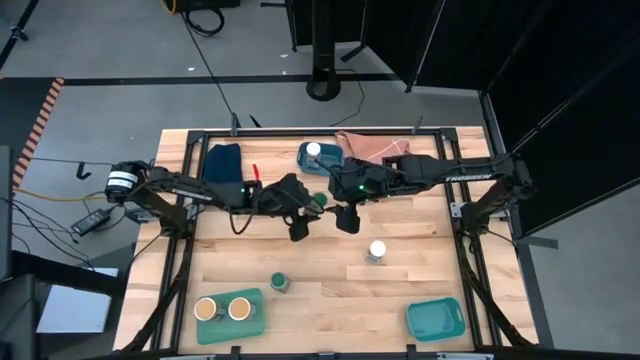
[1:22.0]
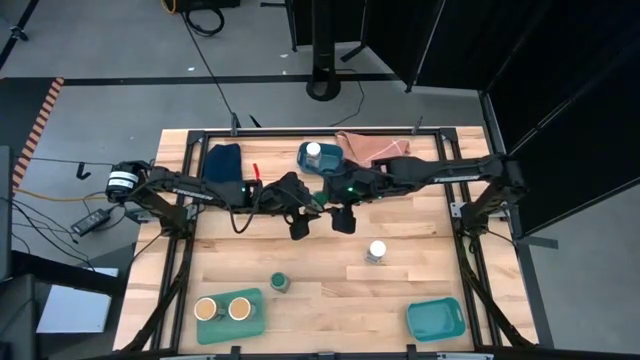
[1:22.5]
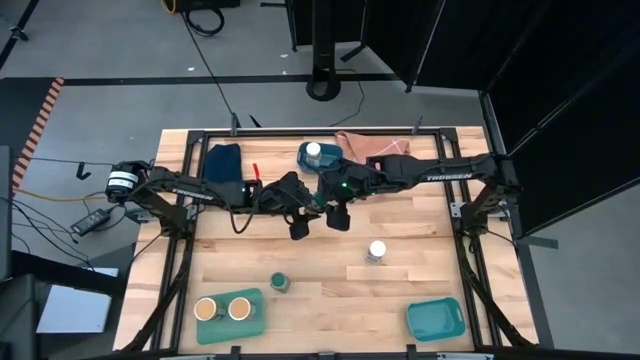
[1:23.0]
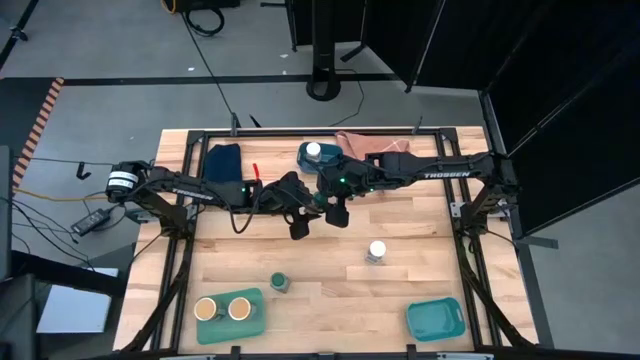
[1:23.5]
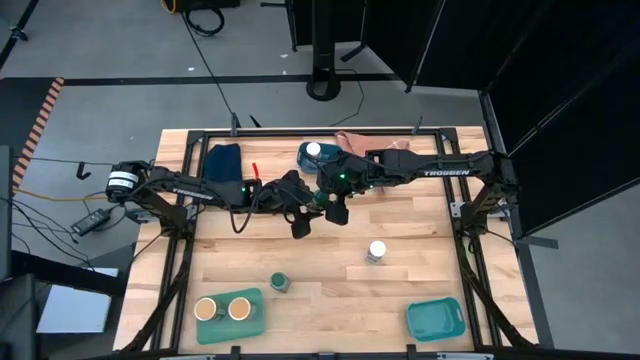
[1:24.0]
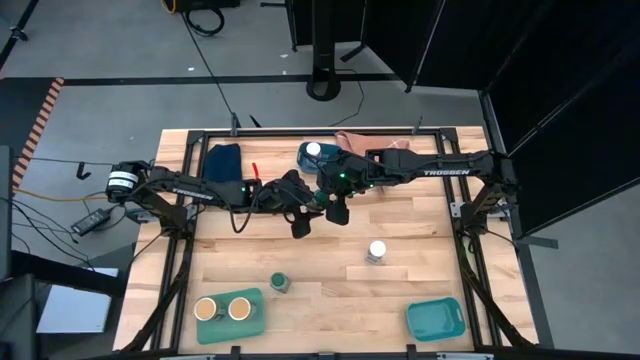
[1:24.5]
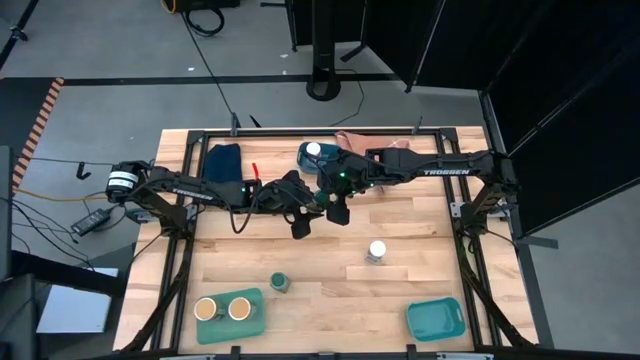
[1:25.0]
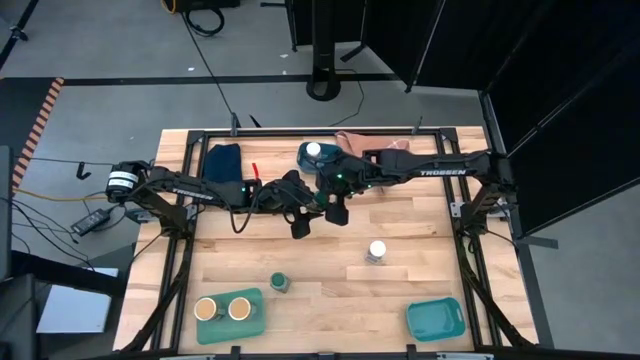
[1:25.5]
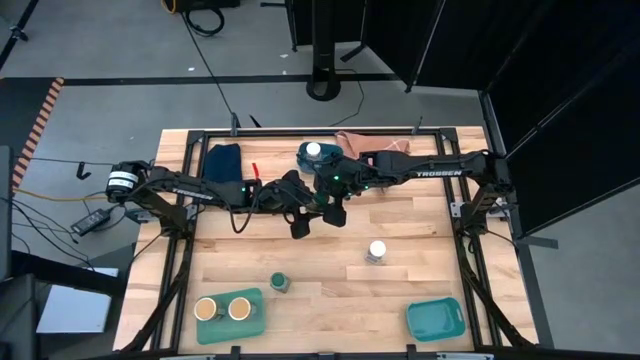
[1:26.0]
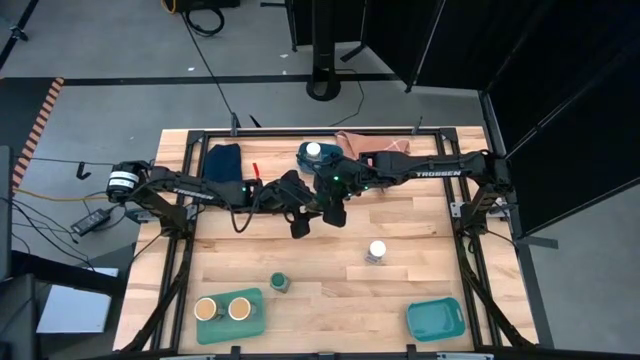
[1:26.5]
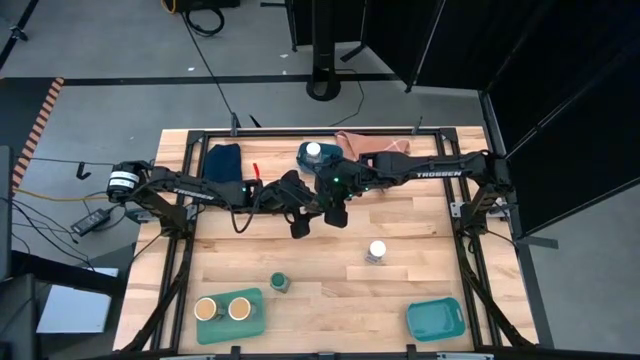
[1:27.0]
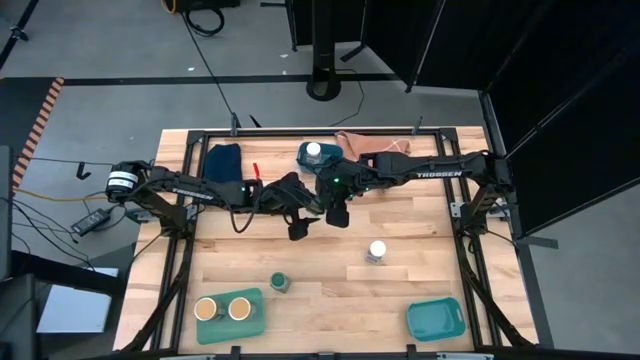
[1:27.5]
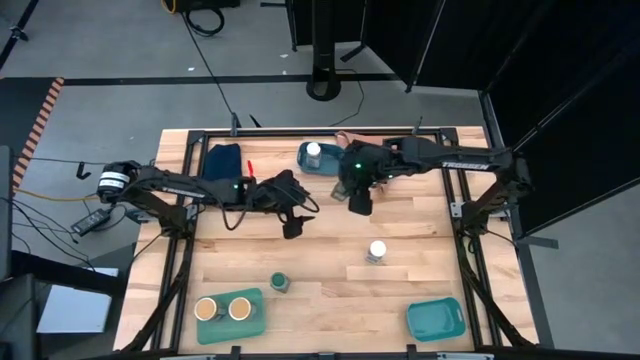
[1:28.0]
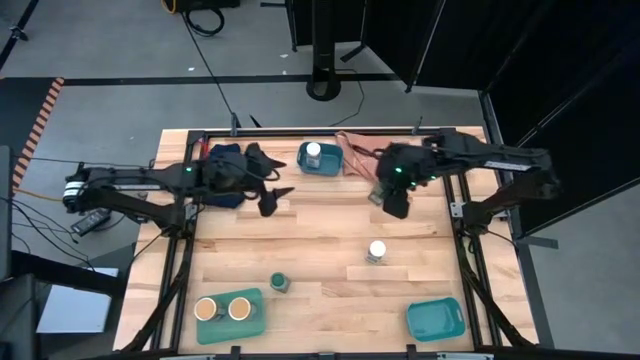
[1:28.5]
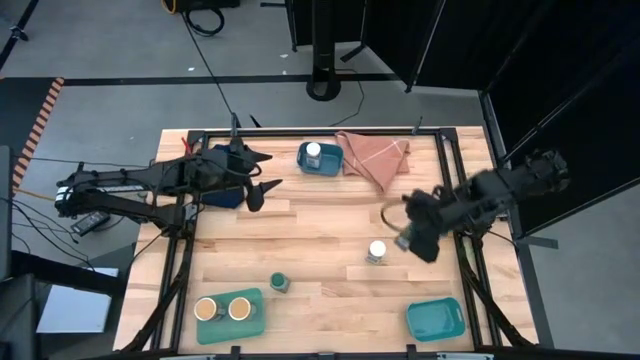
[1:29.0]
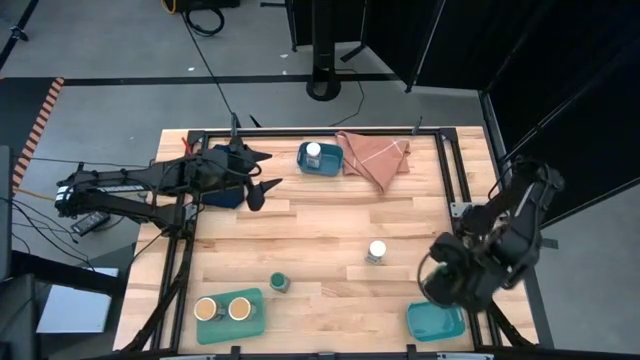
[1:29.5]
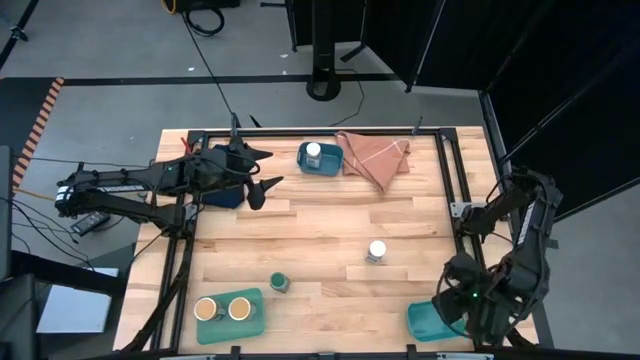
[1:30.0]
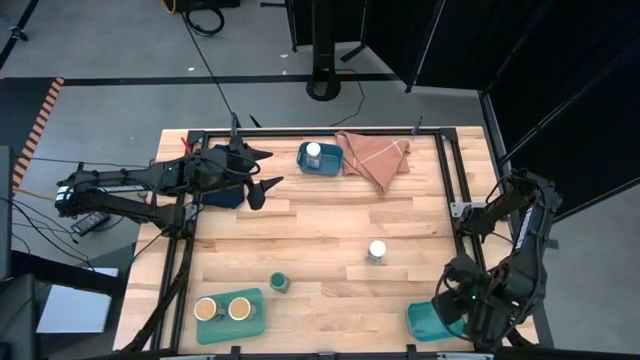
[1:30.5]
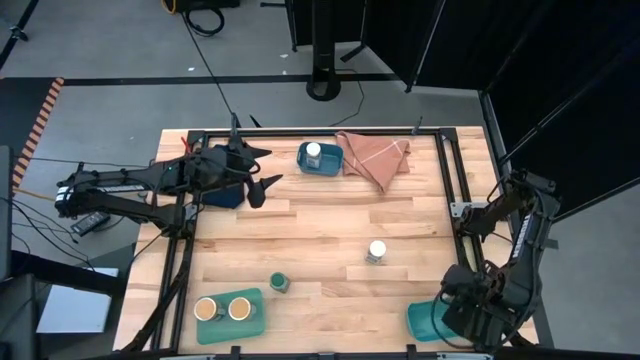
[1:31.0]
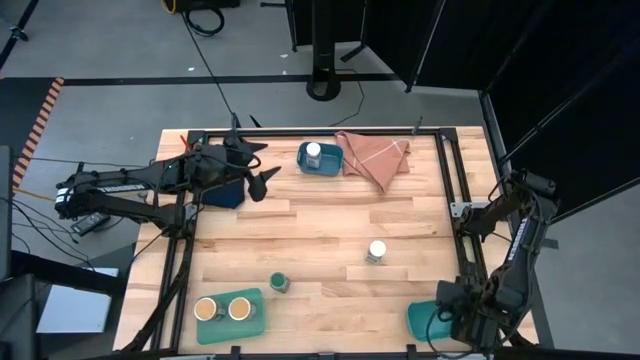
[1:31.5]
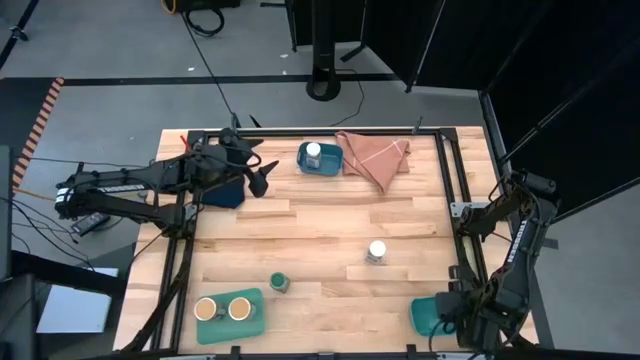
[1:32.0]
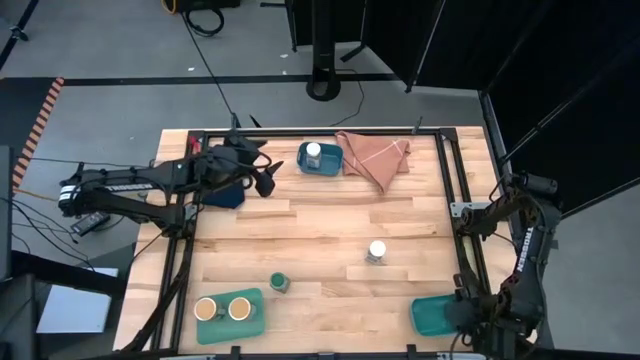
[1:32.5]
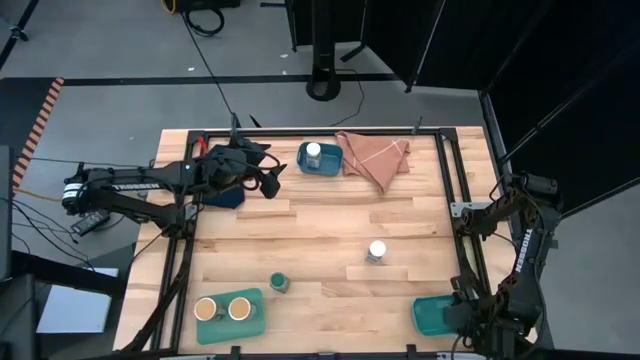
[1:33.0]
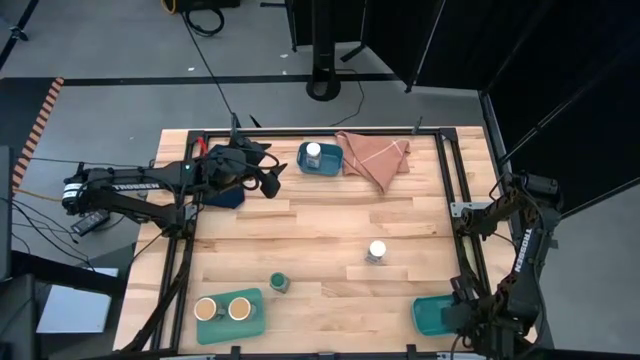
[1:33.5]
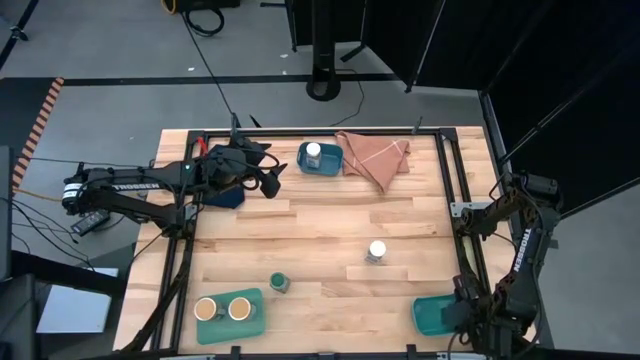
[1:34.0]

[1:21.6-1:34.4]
Task: Sort spices by type
Put the top green seasoning bottle into the green bin

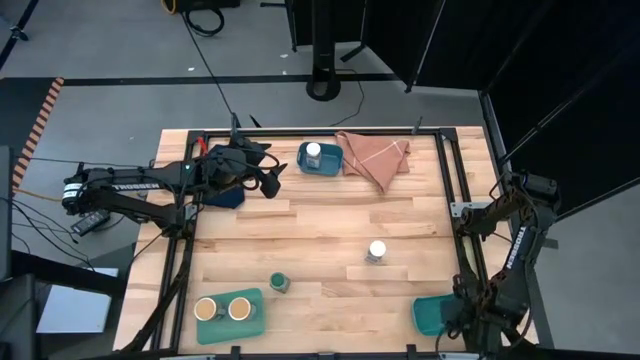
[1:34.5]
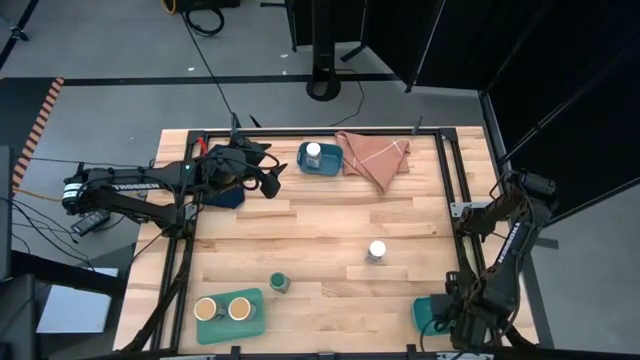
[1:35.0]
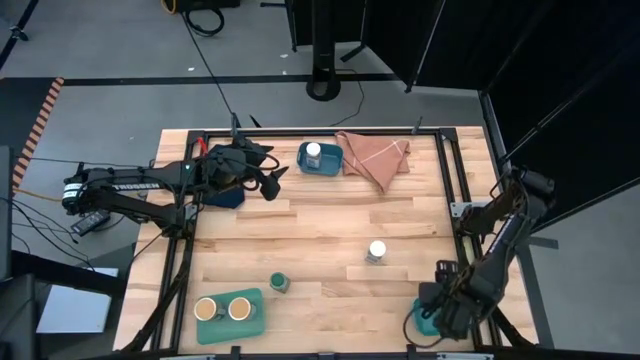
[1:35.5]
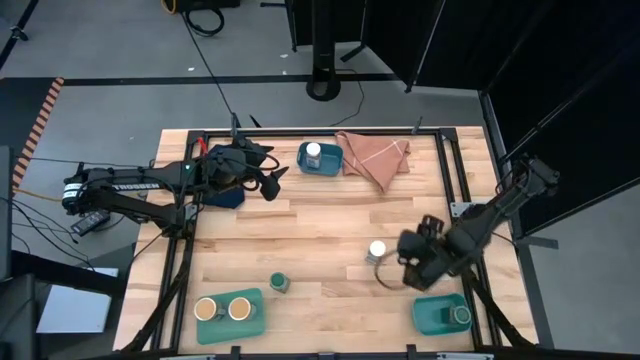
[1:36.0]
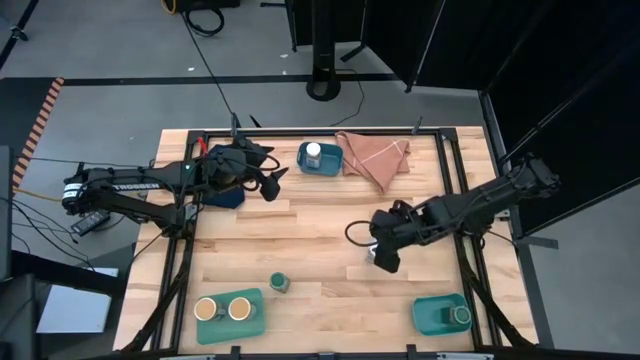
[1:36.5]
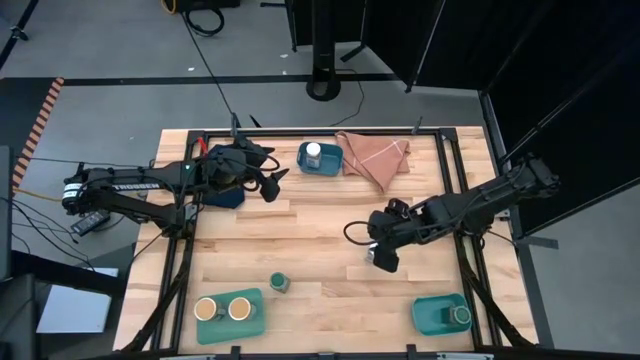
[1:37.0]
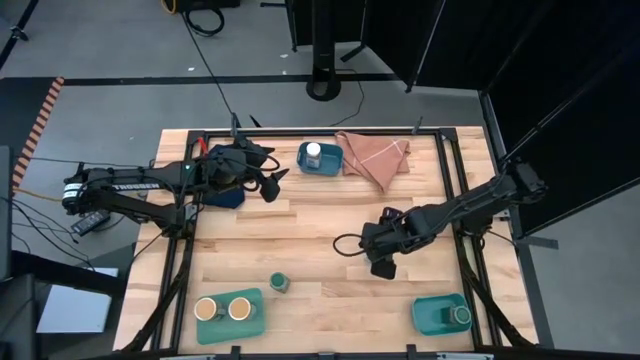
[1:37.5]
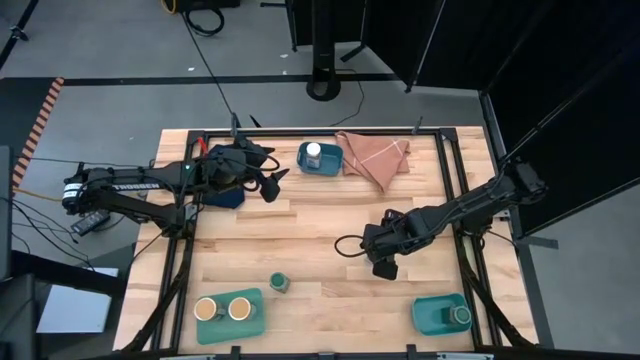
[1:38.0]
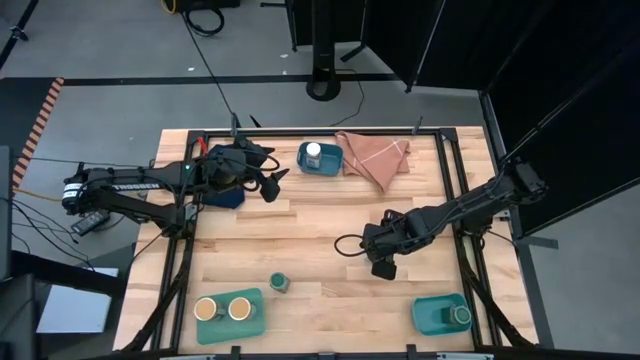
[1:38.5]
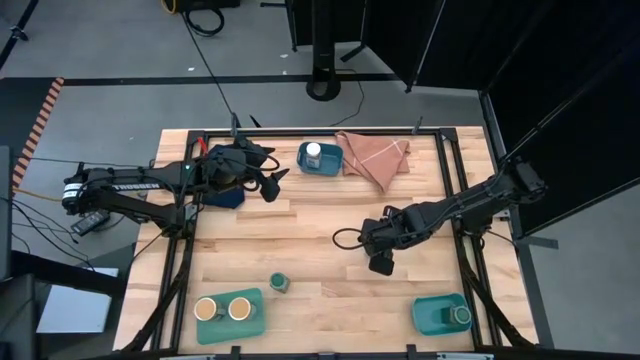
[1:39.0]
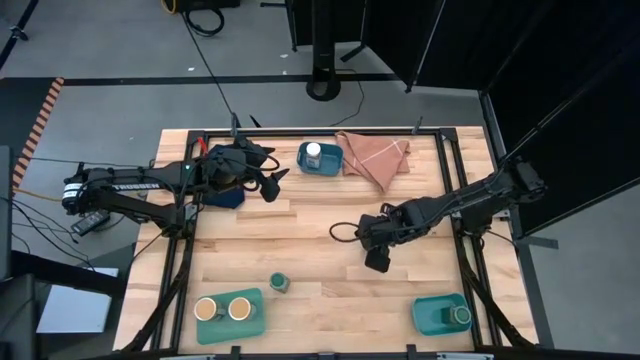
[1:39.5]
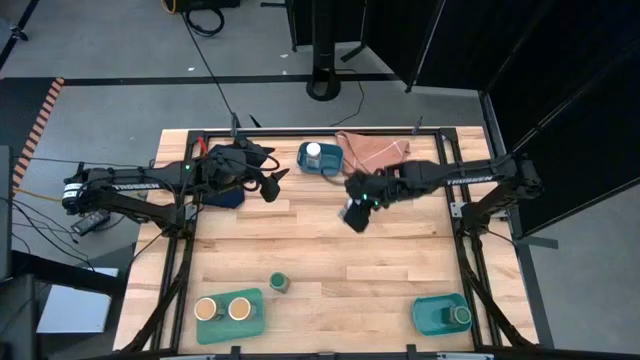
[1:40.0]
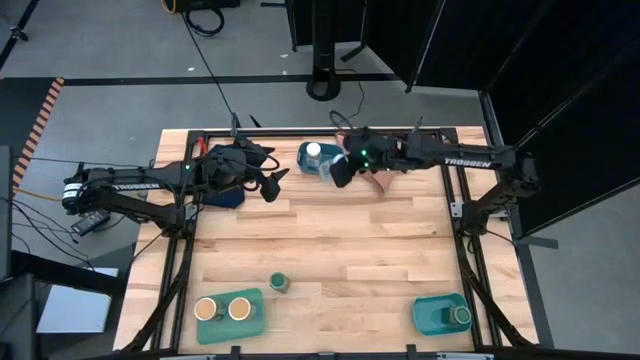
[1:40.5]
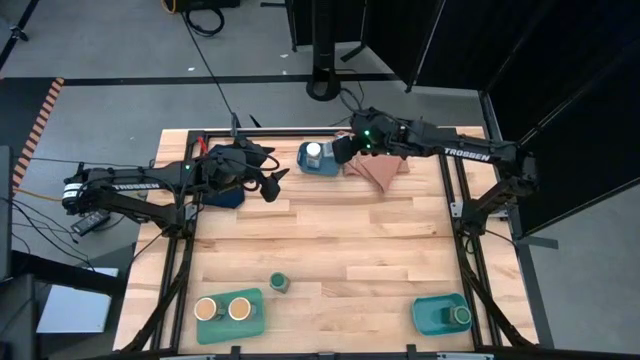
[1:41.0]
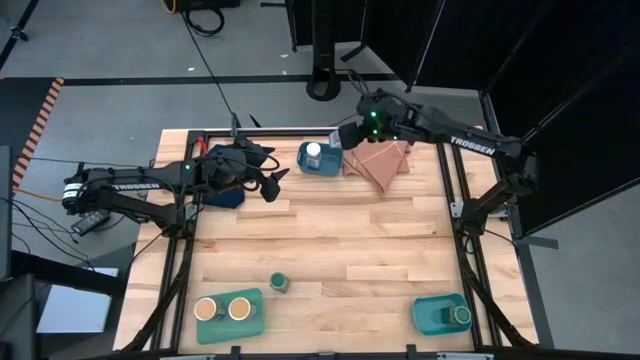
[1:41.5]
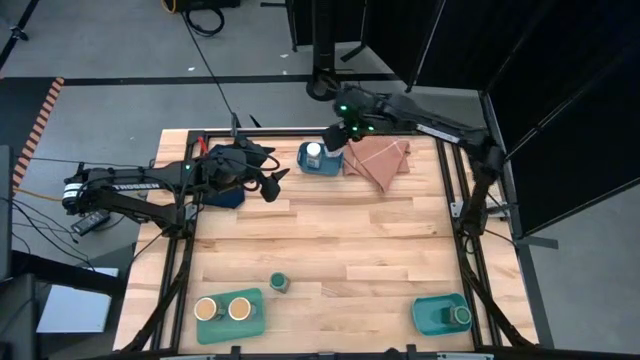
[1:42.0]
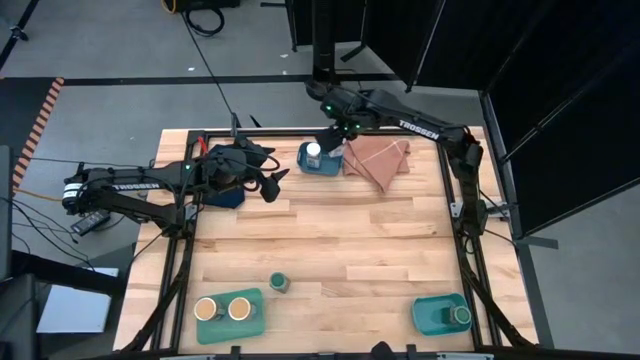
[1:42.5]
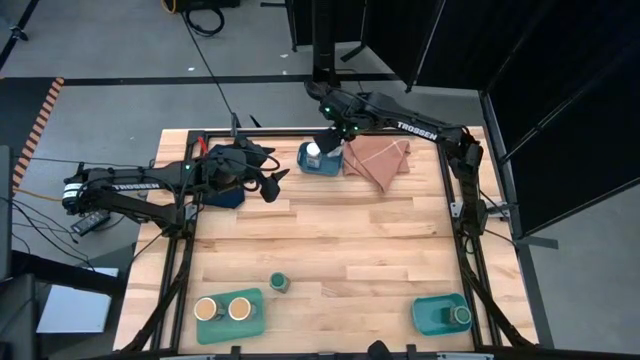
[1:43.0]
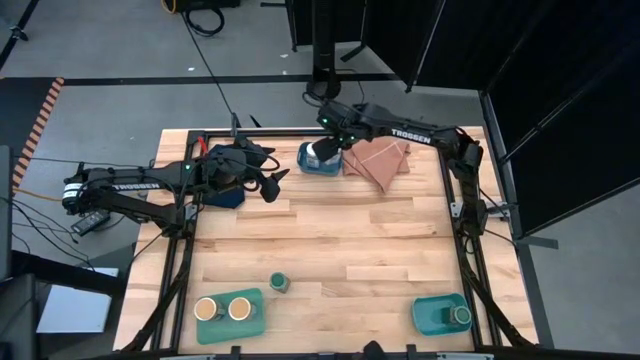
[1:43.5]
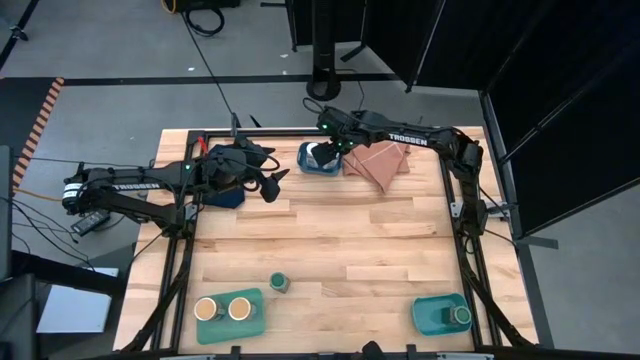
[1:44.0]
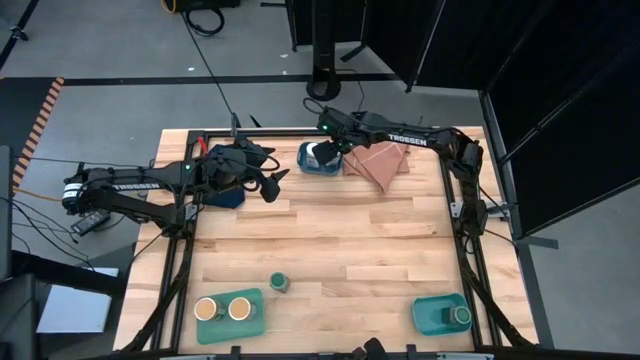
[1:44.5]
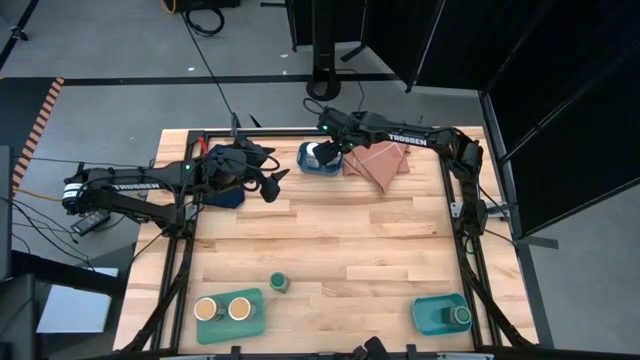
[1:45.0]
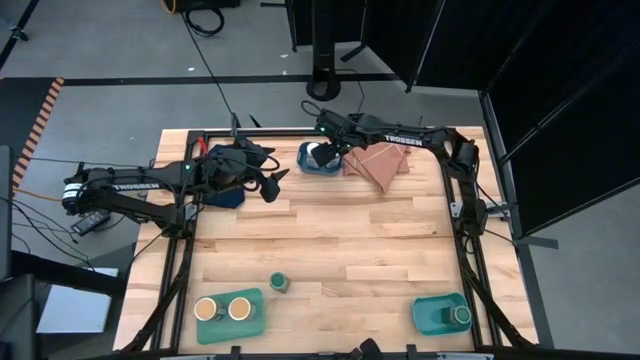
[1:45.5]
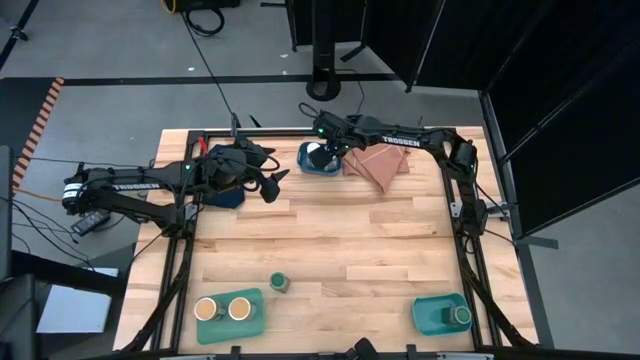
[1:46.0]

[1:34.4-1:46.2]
Put the white seasoning bottle into the blue bin
